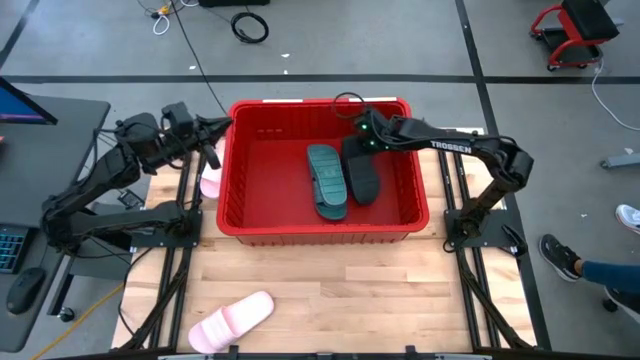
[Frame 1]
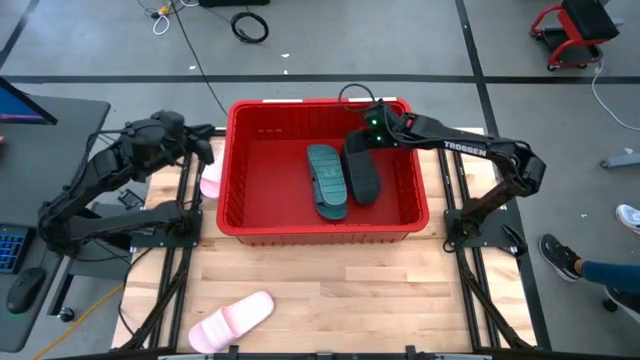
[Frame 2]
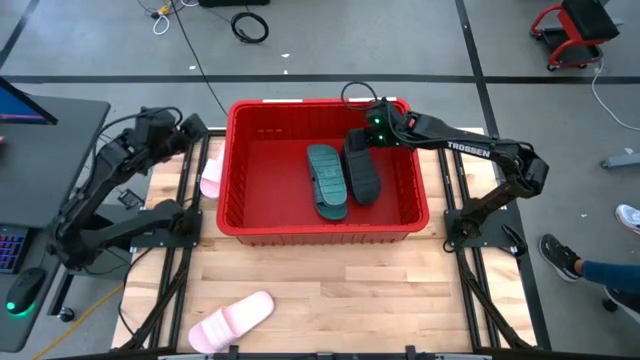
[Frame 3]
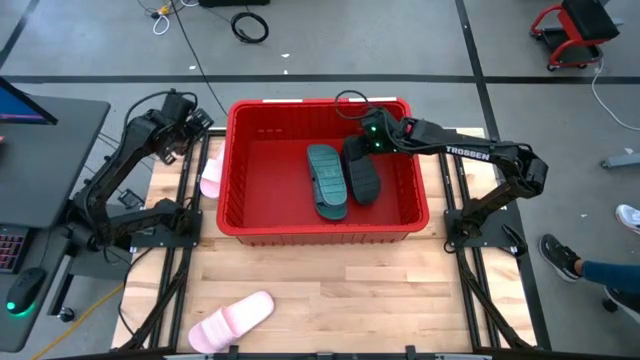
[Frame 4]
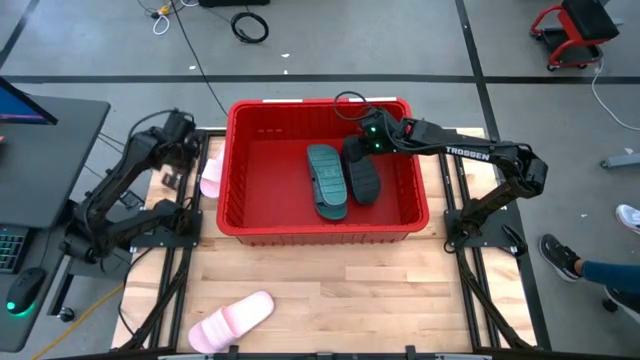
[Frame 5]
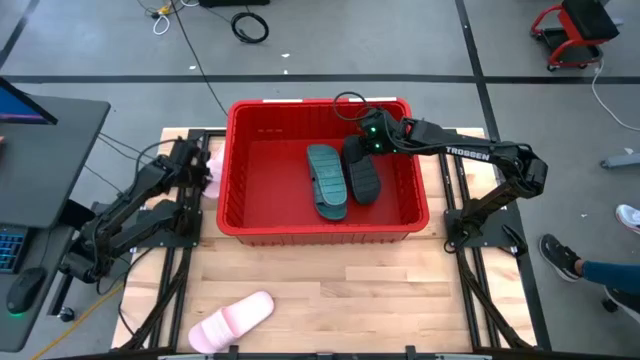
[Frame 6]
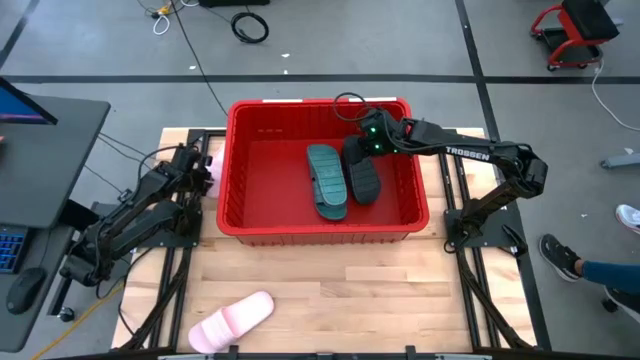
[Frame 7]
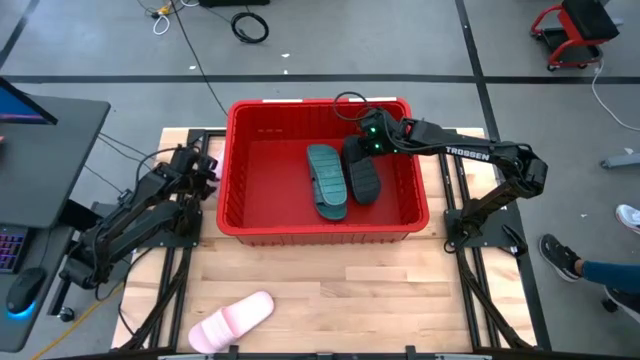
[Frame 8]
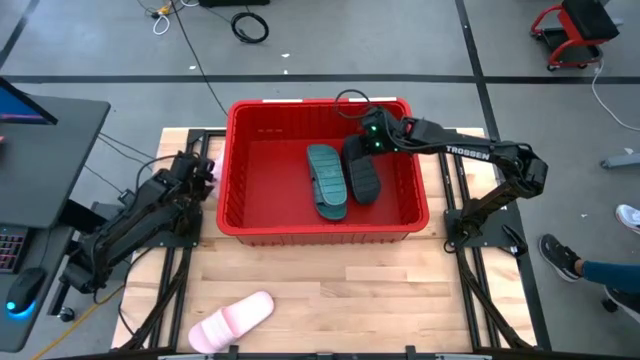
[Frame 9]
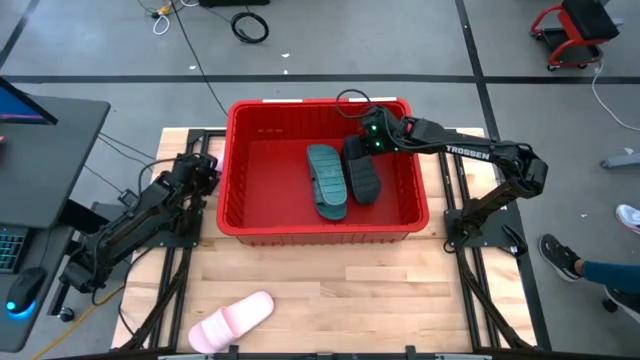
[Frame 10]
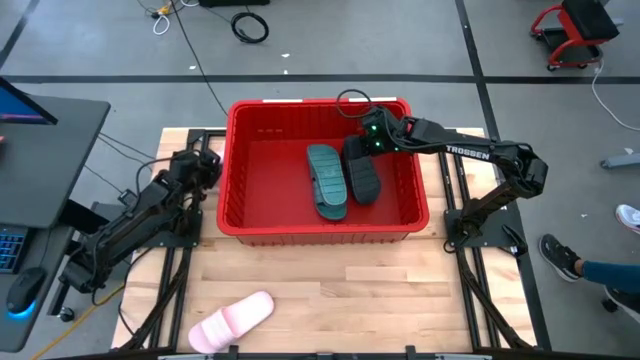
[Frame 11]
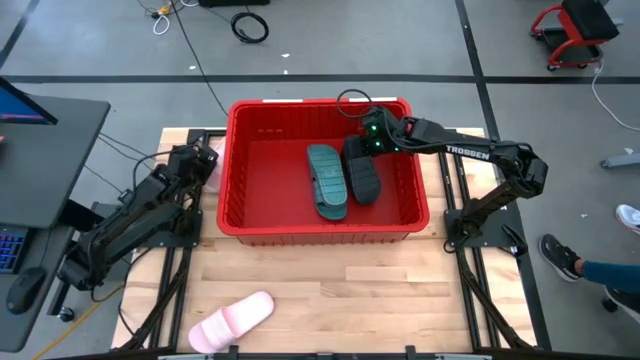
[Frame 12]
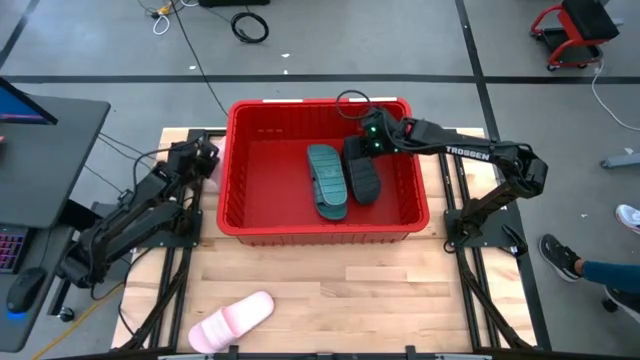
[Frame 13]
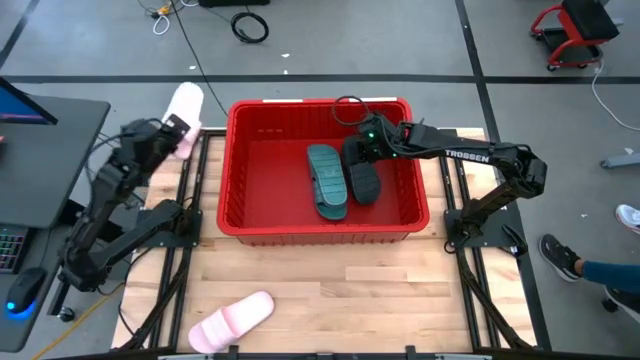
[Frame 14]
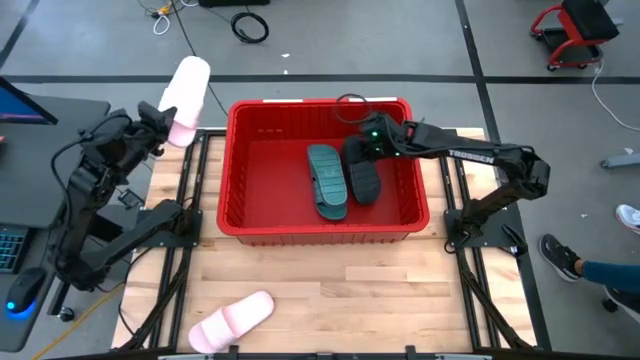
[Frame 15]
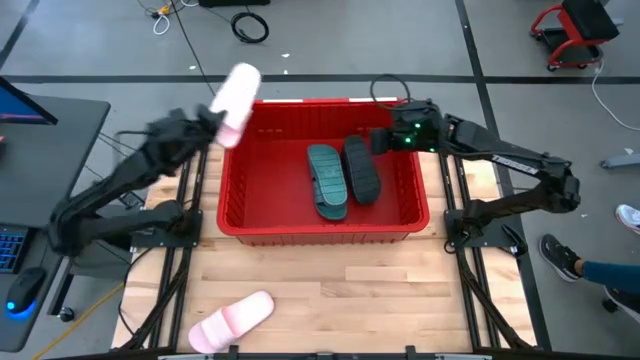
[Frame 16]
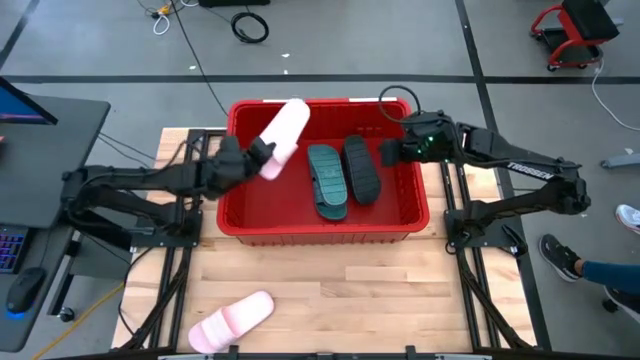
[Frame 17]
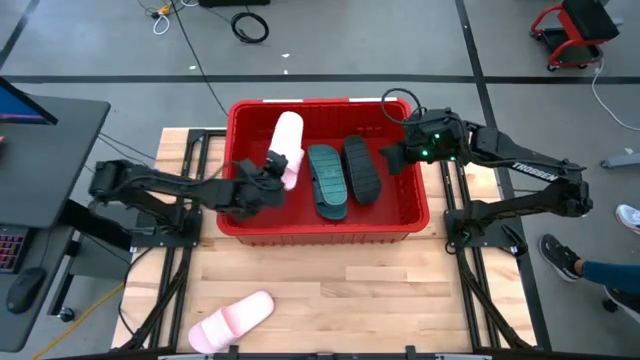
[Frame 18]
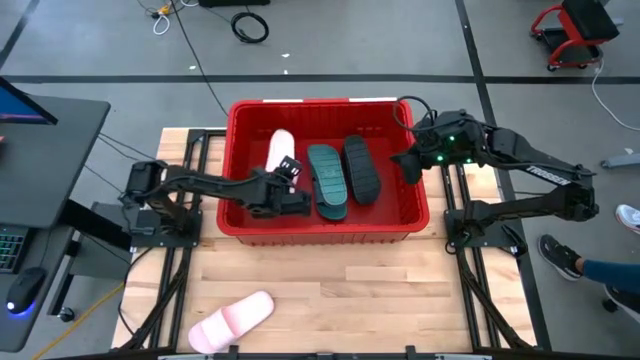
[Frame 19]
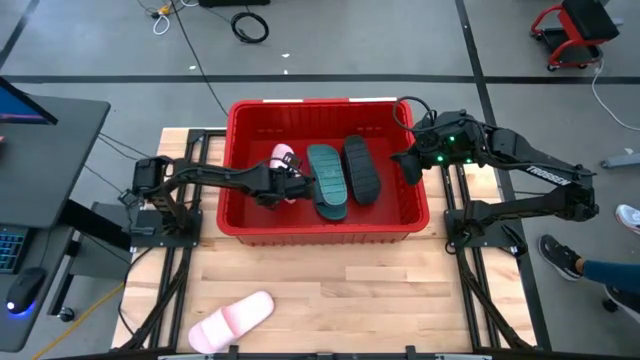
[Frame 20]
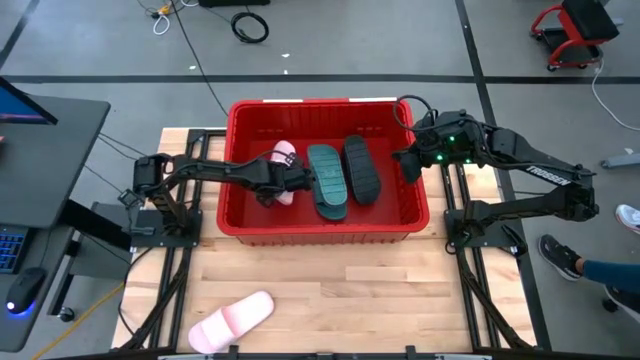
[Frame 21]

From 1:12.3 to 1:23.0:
Task: Pick and place slides into bin
Put the top pink slide into the red bin

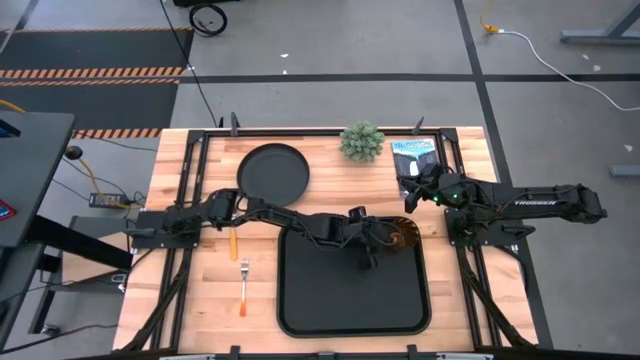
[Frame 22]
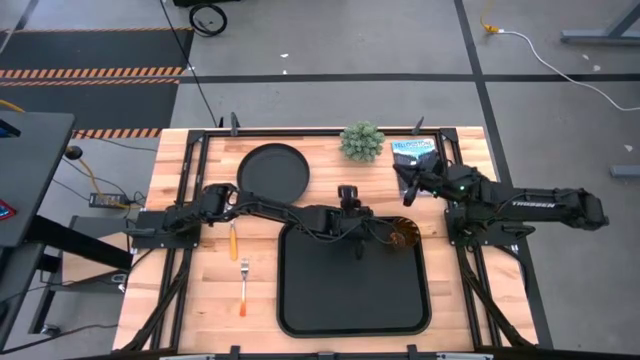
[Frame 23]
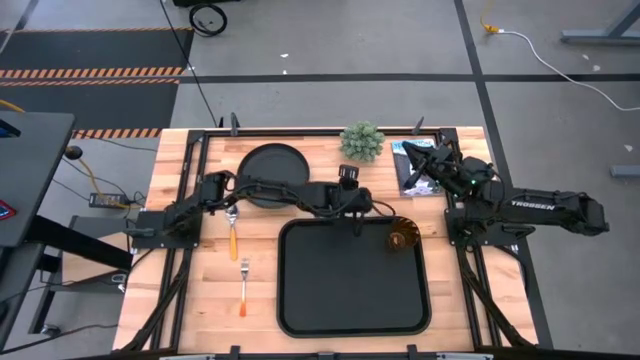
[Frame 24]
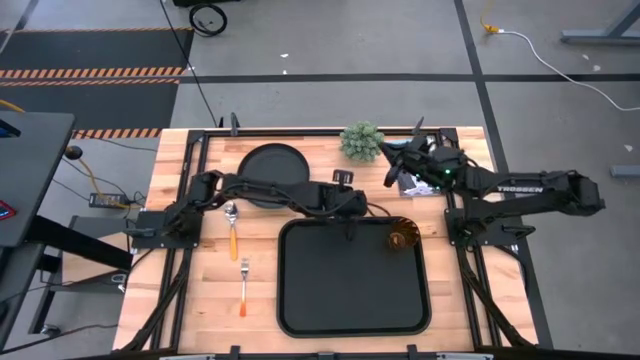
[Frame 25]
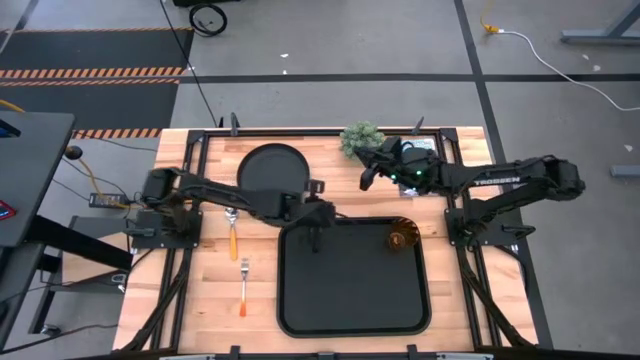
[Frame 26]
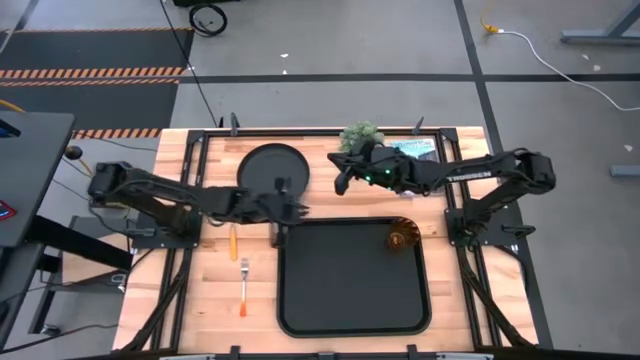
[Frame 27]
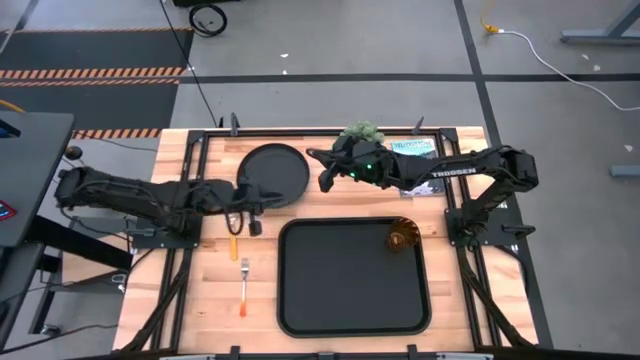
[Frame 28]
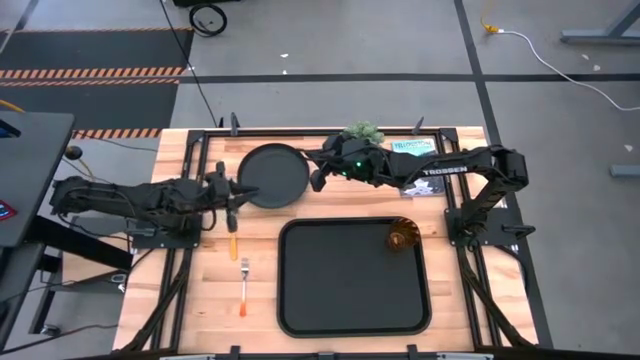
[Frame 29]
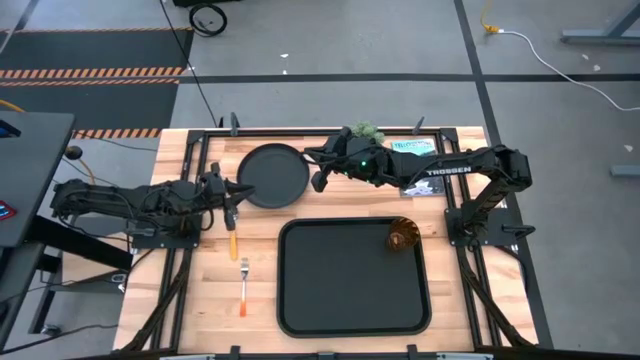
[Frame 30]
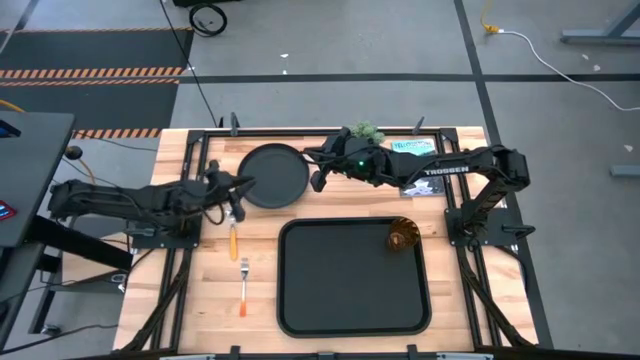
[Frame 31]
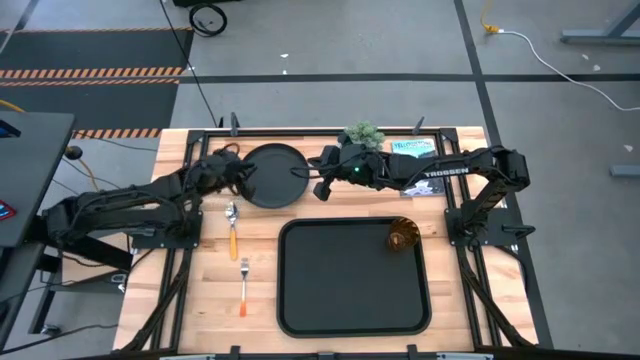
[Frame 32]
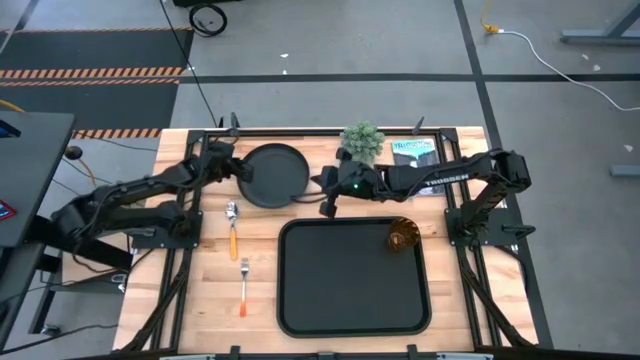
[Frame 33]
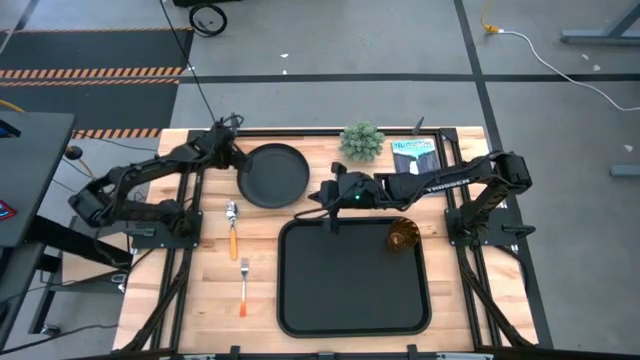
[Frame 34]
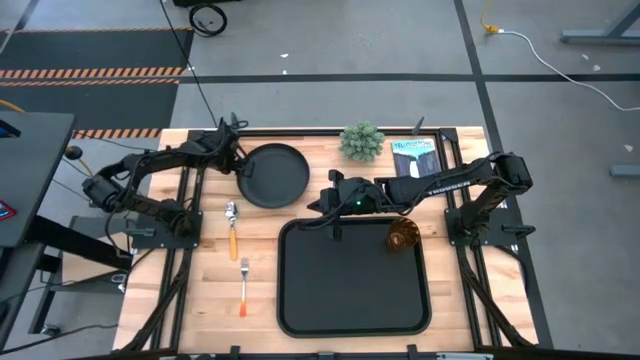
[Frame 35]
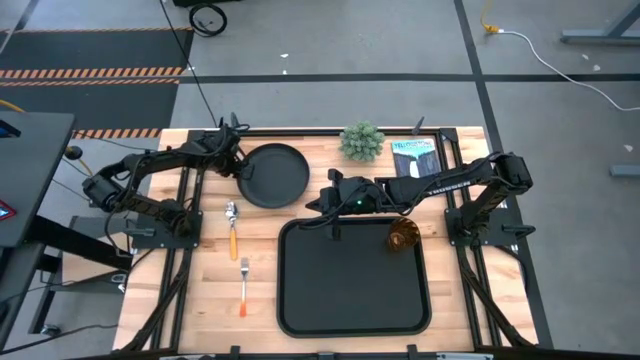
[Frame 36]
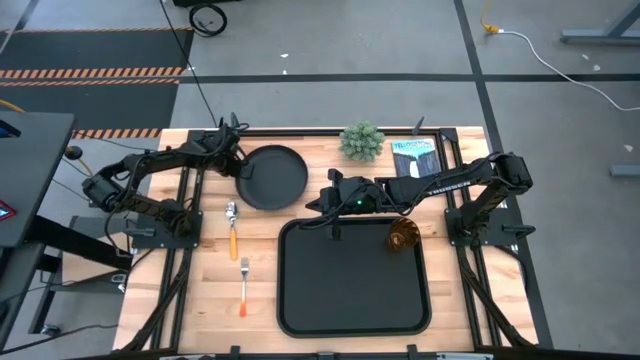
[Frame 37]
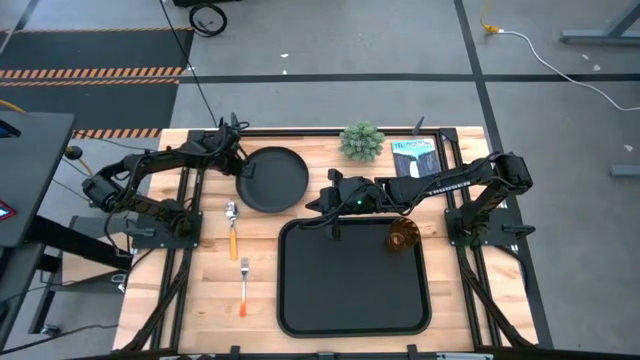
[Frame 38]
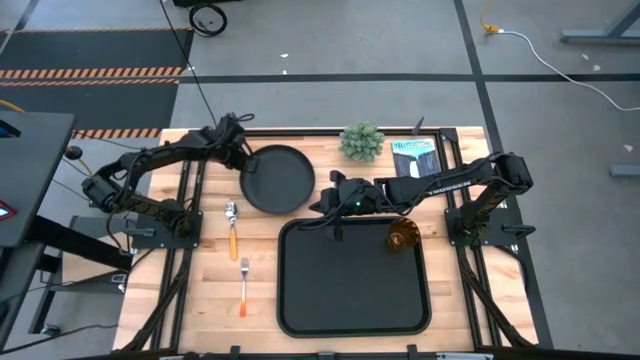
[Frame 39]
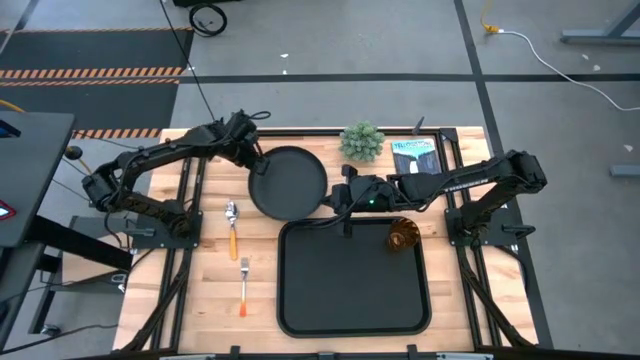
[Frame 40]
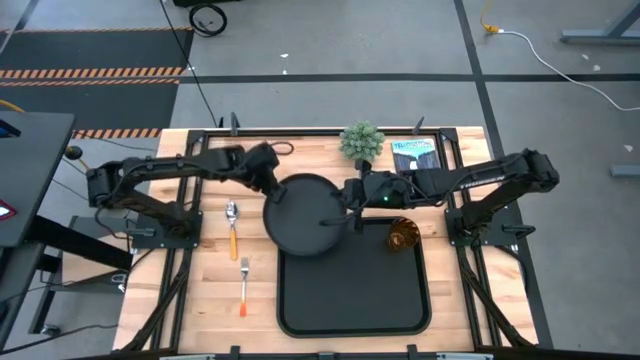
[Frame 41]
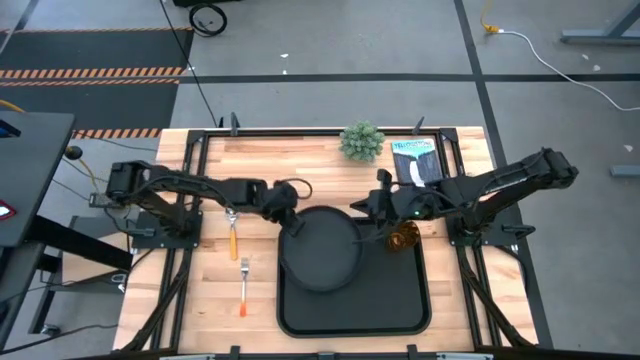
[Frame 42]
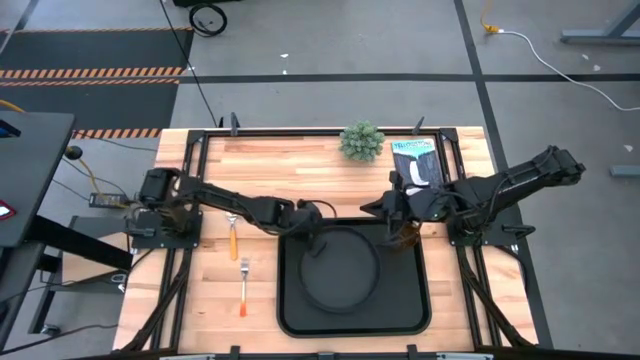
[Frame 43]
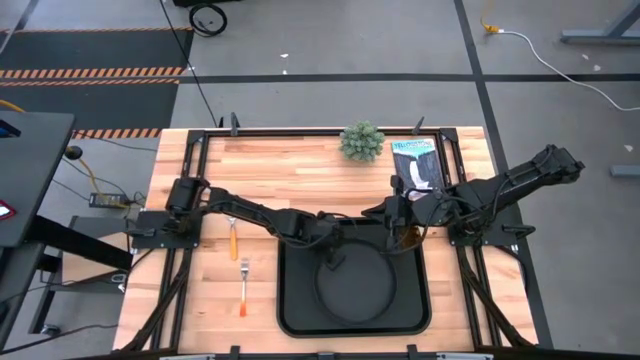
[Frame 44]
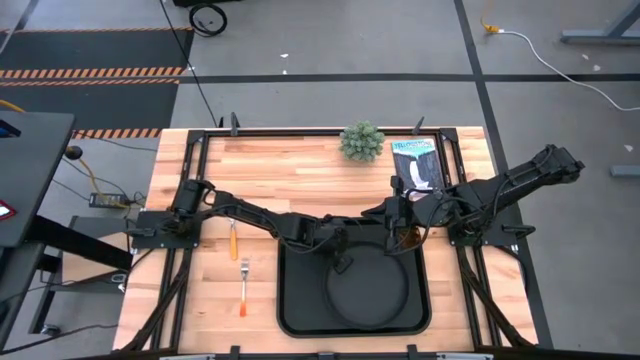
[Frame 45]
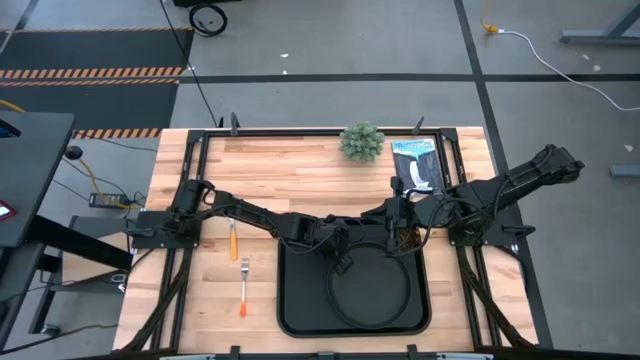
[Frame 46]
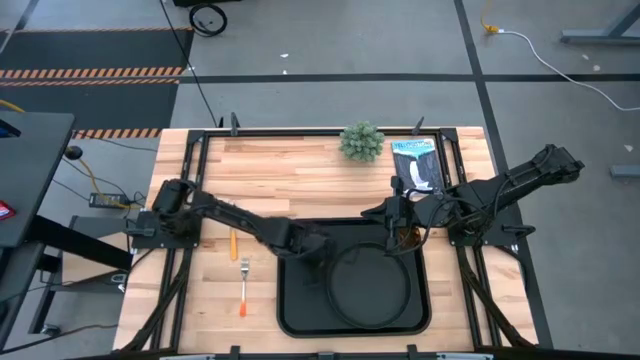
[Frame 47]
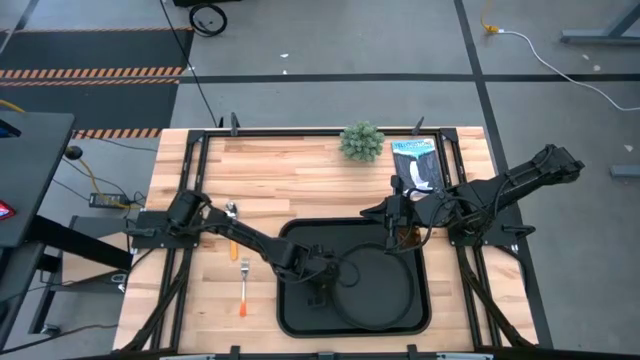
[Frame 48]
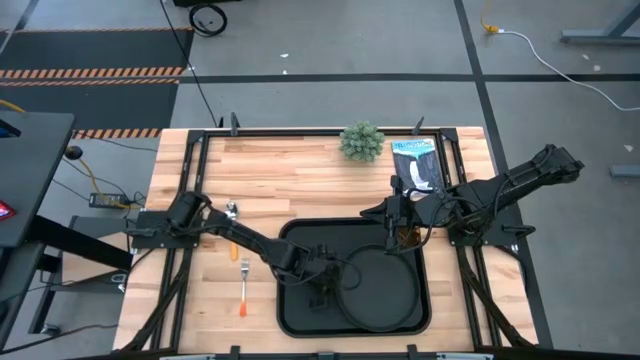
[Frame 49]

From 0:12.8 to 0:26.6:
Task: Pick and place plate/cup/fork/spoon on tray
Put the black plate on the bottom right of the black serving tray
